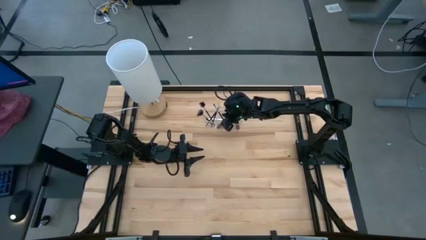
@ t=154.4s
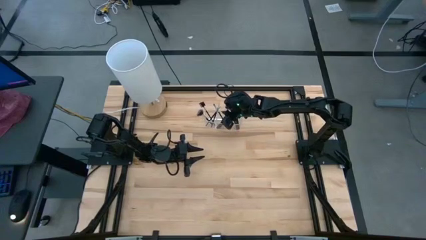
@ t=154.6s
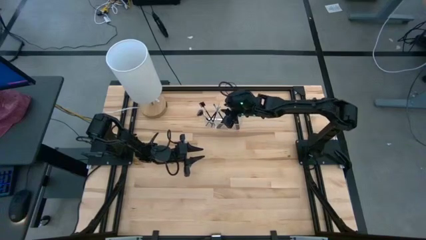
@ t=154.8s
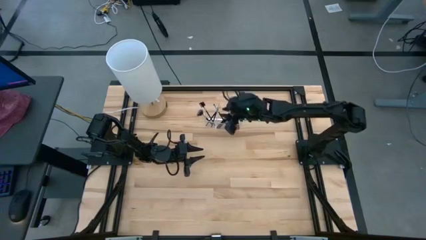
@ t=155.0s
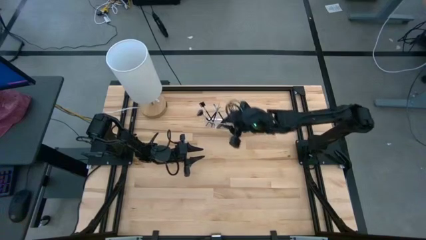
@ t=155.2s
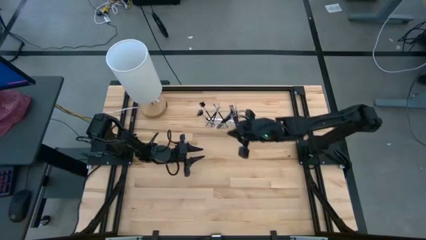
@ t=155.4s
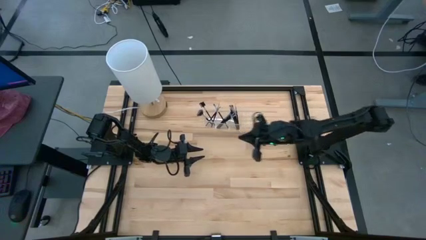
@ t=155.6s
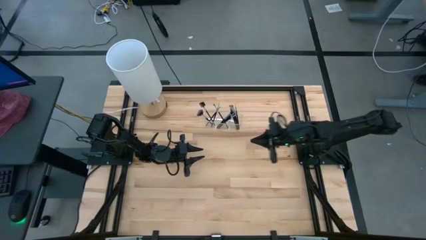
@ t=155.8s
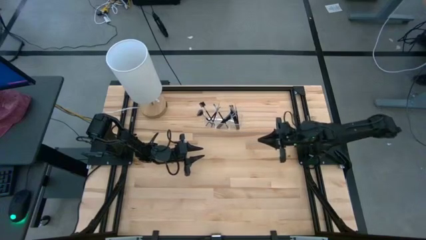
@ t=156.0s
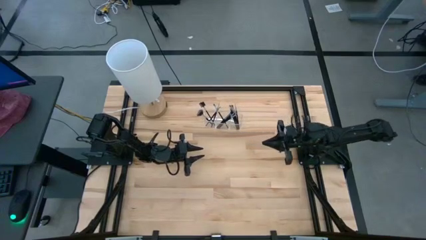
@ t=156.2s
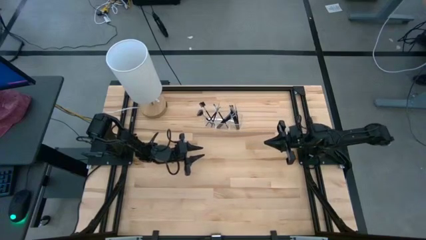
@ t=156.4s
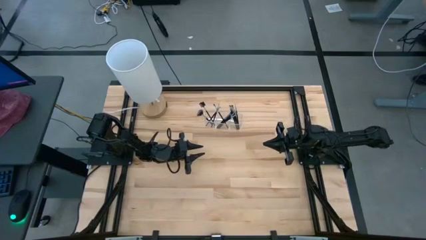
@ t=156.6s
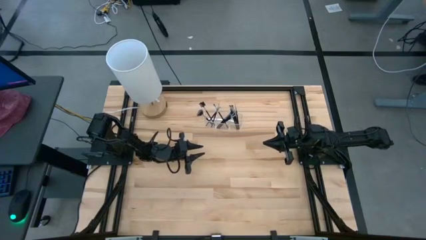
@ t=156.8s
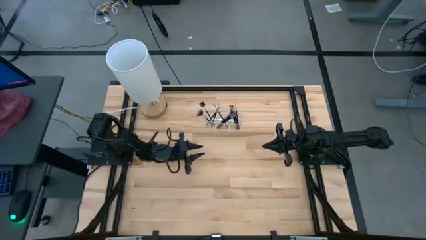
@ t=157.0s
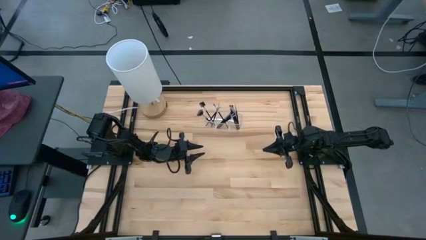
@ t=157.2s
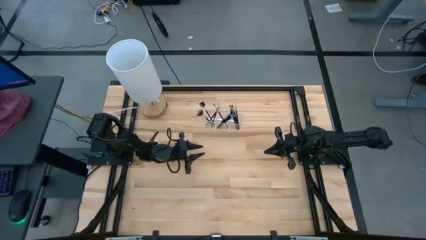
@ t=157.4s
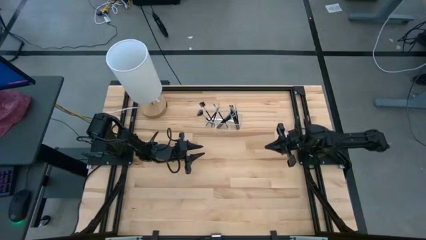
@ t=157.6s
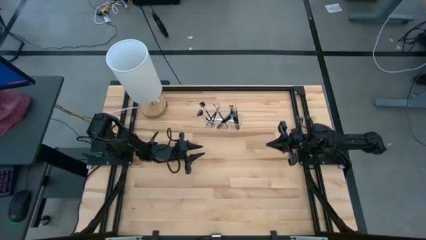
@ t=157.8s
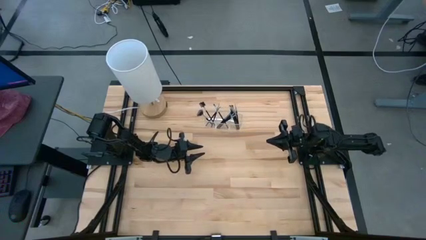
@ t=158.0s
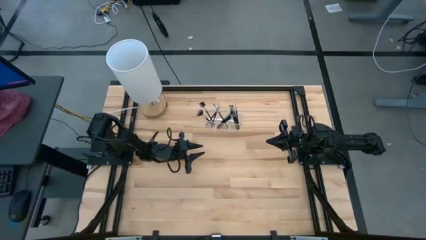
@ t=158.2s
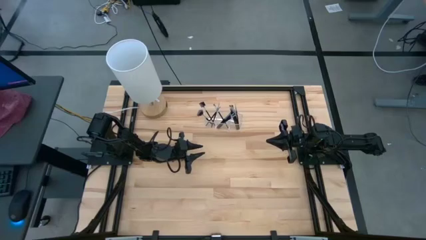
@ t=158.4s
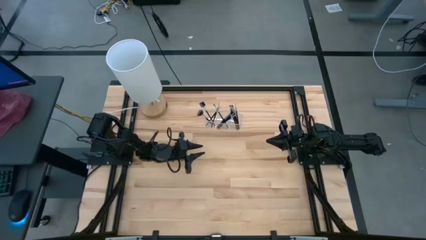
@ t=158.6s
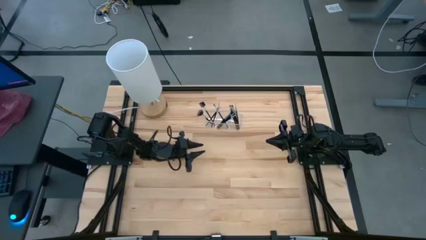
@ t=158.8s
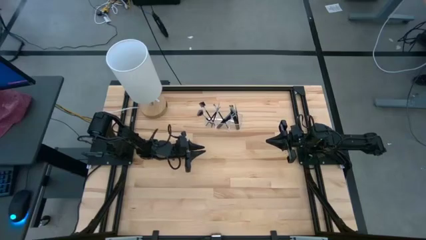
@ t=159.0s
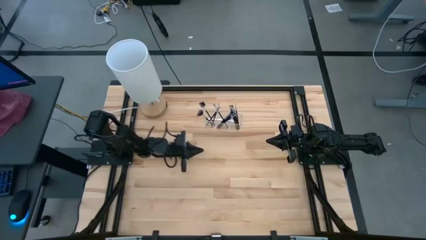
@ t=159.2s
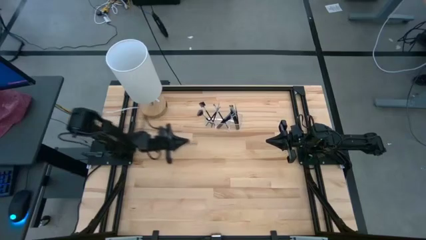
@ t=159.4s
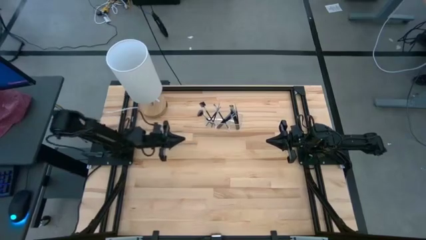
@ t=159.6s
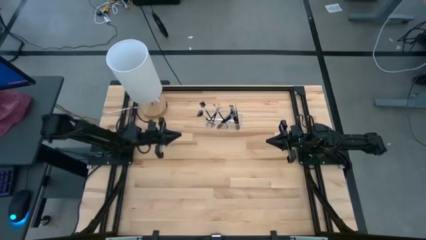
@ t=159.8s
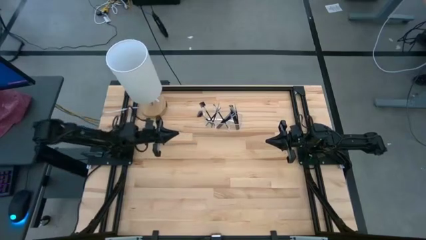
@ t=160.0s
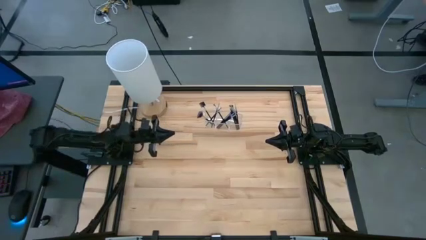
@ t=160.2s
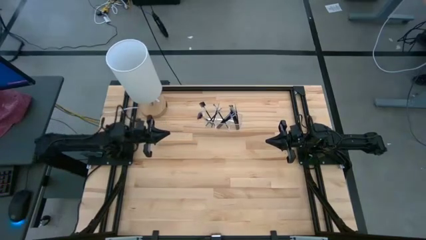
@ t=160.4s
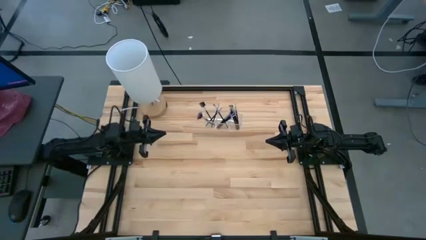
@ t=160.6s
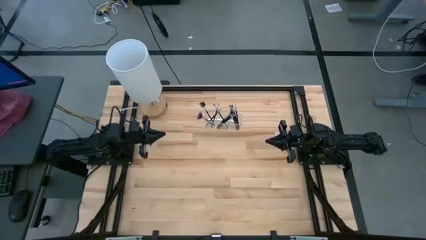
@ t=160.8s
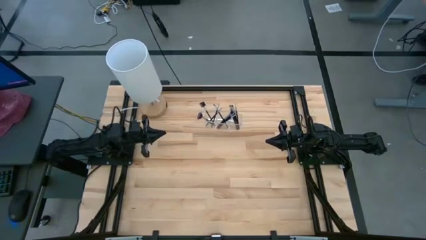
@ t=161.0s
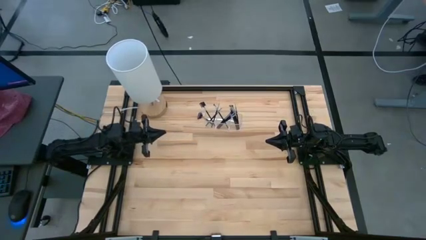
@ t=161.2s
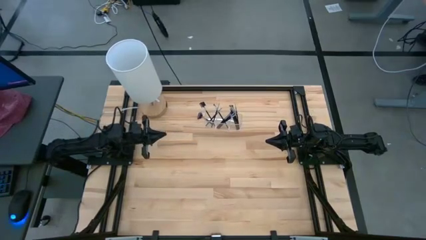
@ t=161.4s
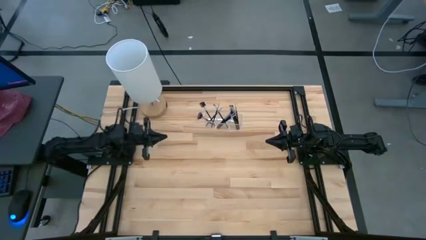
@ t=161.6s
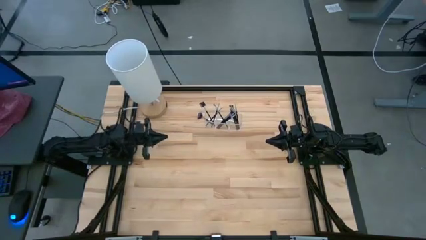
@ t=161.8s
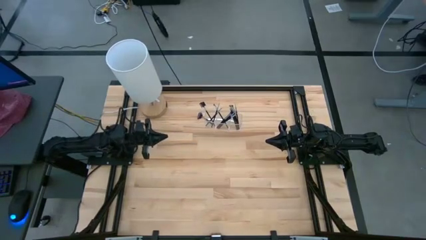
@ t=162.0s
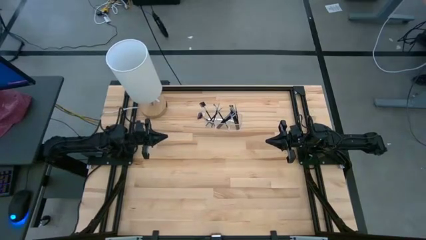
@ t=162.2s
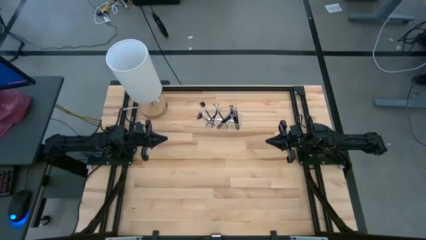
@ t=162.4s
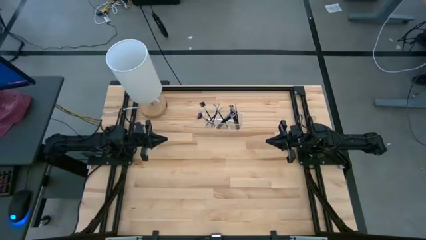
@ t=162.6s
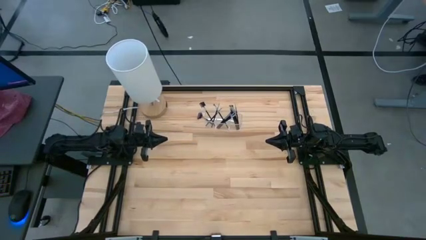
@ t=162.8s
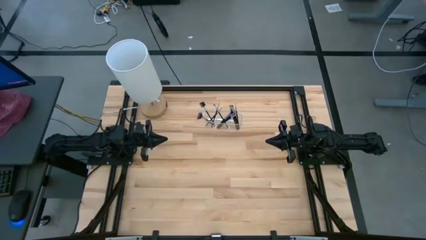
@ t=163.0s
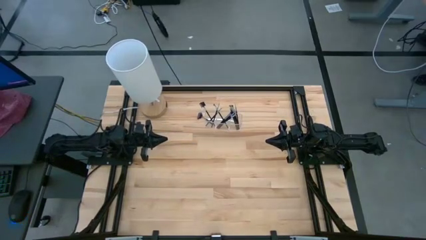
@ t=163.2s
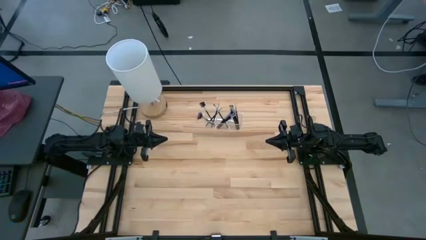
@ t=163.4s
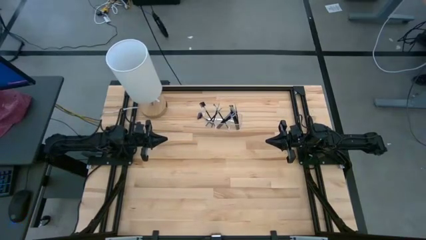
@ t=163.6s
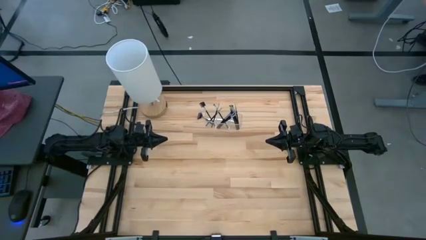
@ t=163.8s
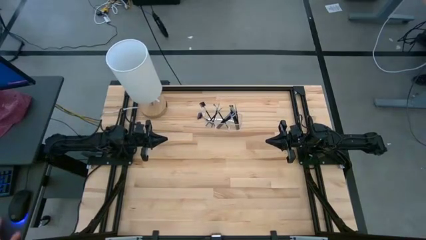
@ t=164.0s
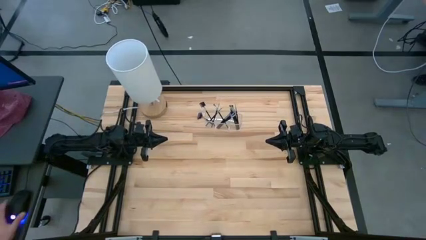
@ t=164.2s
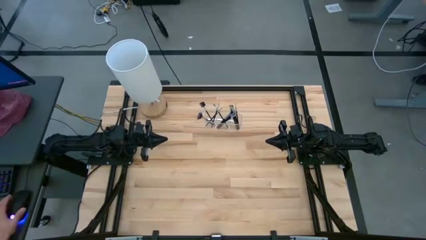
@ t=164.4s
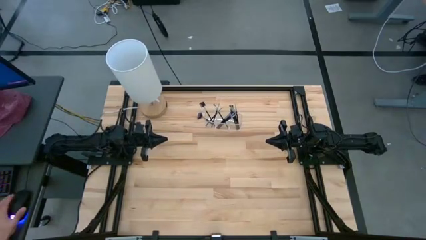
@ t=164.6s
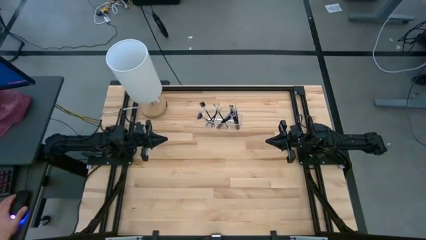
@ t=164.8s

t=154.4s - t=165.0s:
Task: Put items in baskets/containers
Return to Home Position

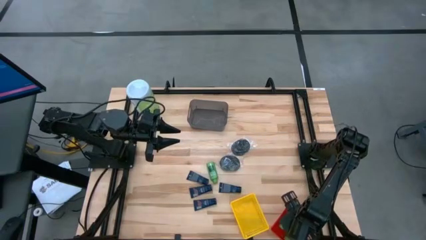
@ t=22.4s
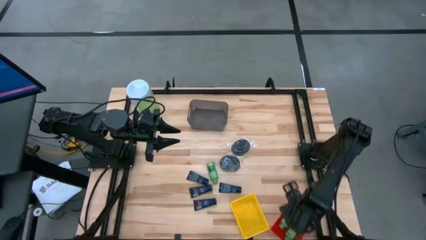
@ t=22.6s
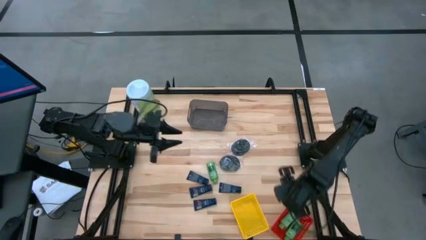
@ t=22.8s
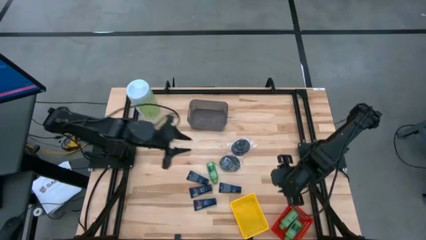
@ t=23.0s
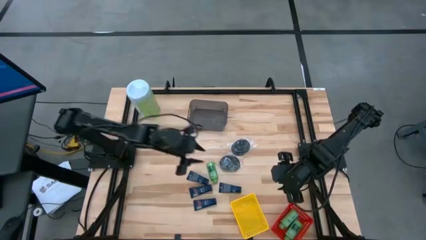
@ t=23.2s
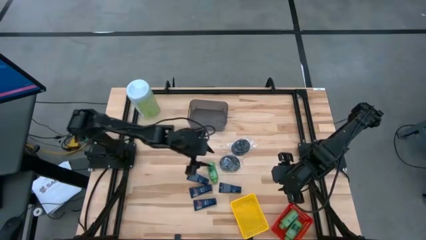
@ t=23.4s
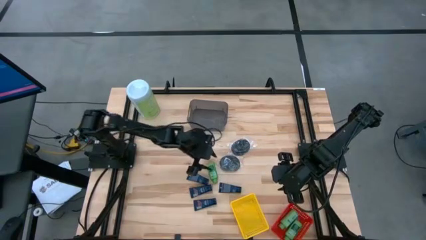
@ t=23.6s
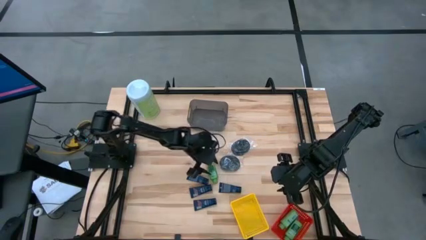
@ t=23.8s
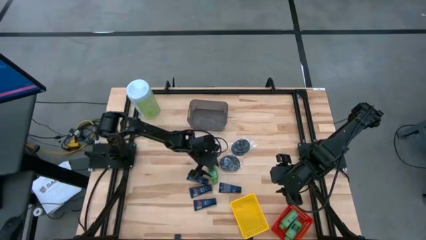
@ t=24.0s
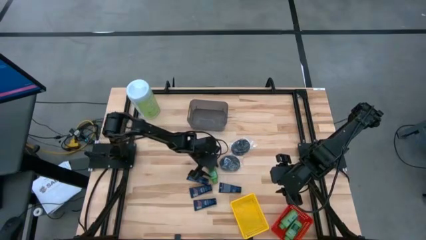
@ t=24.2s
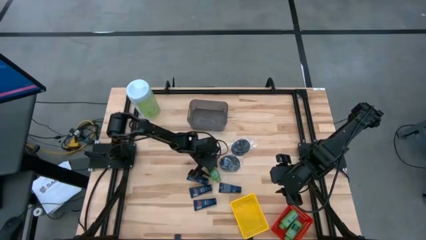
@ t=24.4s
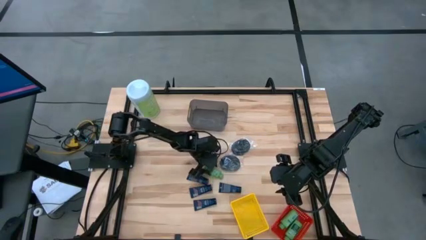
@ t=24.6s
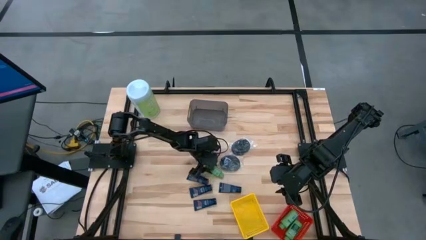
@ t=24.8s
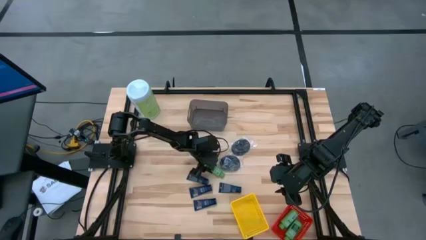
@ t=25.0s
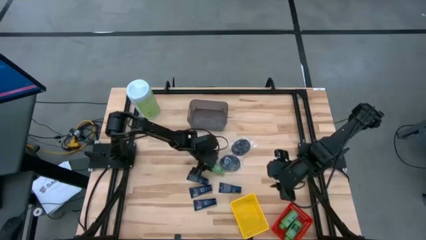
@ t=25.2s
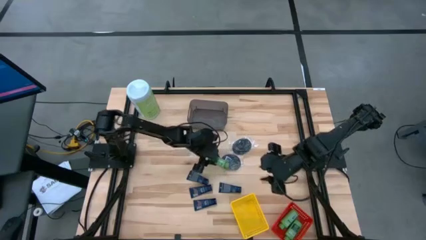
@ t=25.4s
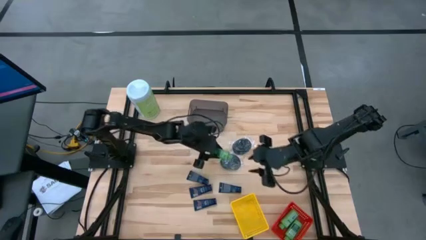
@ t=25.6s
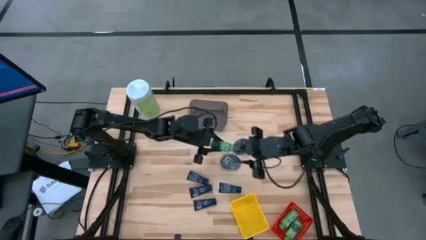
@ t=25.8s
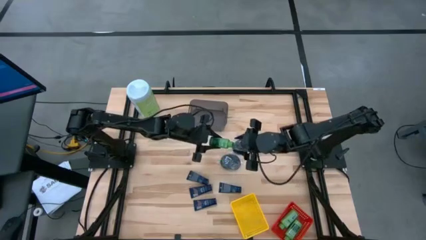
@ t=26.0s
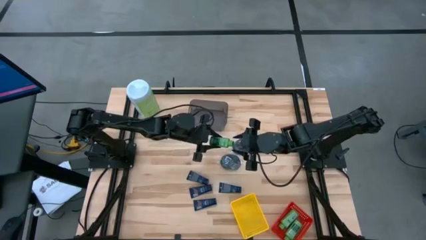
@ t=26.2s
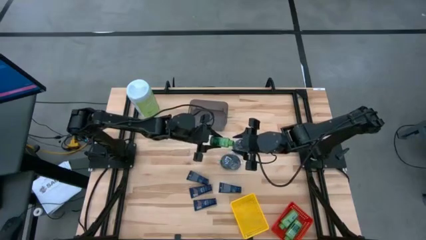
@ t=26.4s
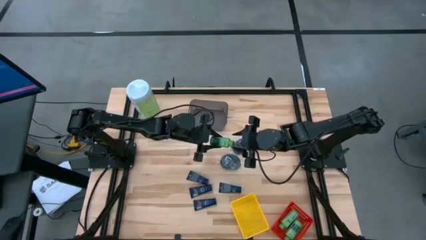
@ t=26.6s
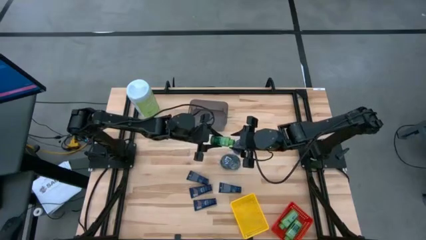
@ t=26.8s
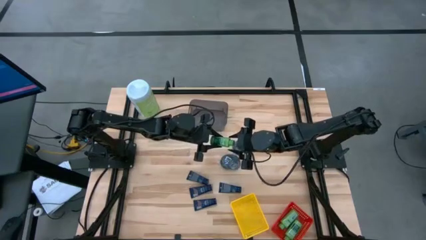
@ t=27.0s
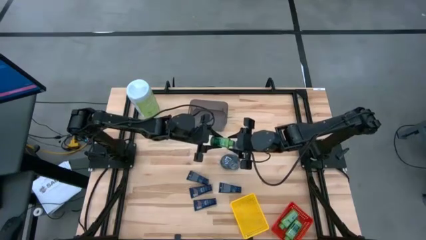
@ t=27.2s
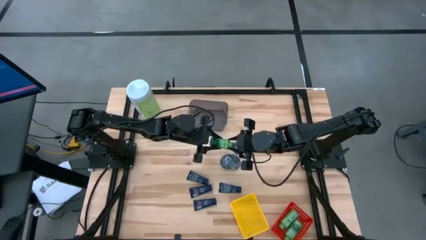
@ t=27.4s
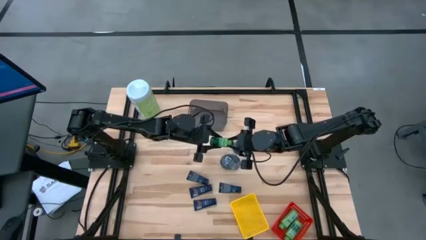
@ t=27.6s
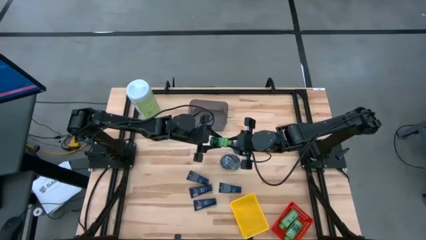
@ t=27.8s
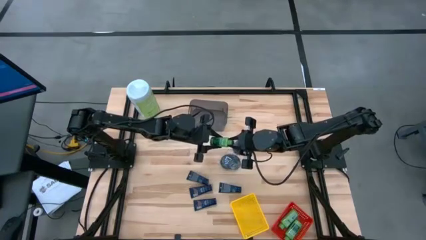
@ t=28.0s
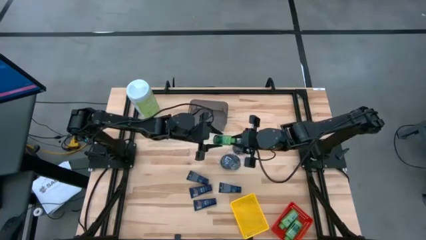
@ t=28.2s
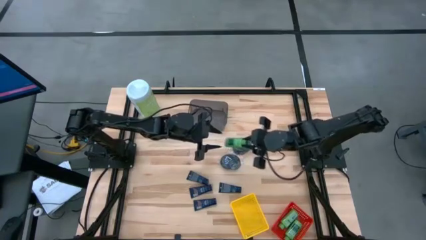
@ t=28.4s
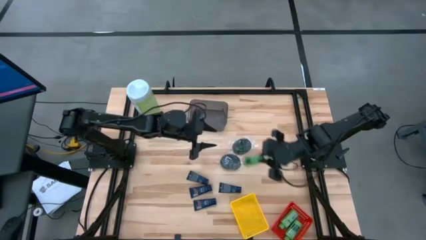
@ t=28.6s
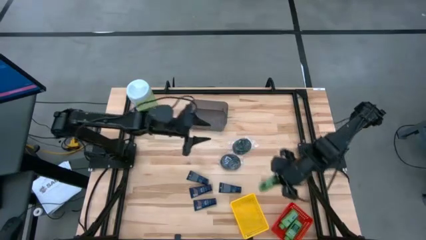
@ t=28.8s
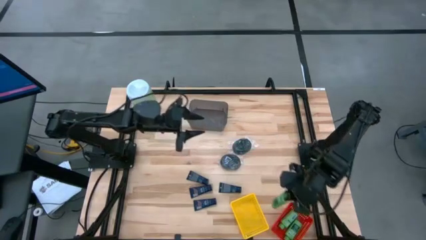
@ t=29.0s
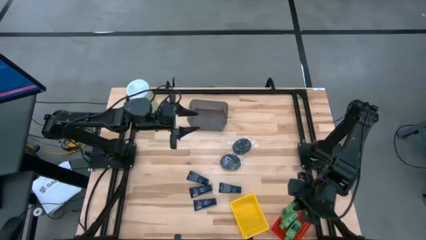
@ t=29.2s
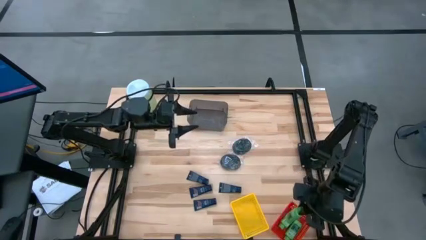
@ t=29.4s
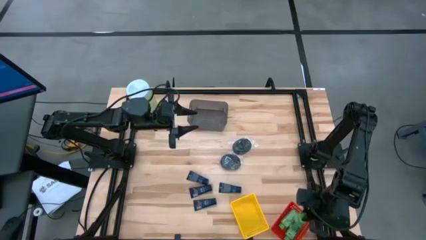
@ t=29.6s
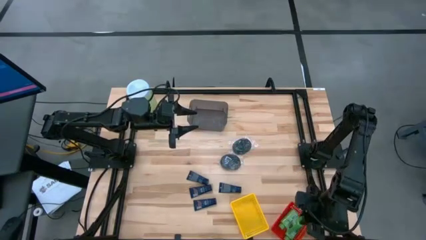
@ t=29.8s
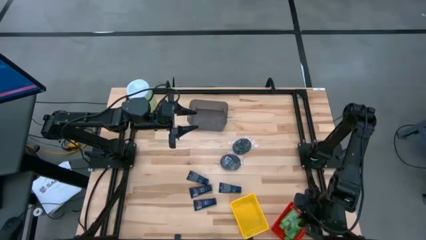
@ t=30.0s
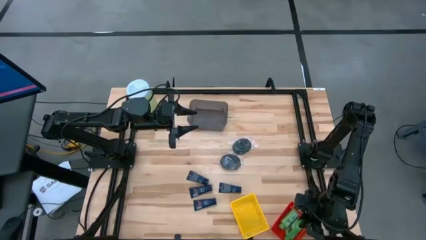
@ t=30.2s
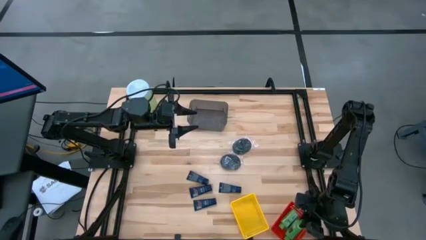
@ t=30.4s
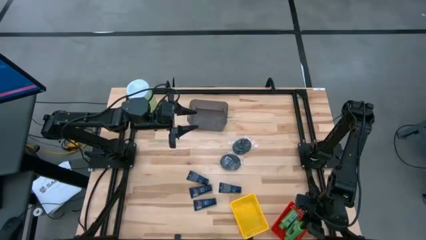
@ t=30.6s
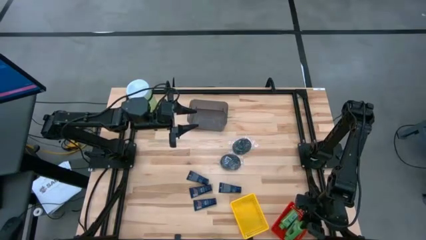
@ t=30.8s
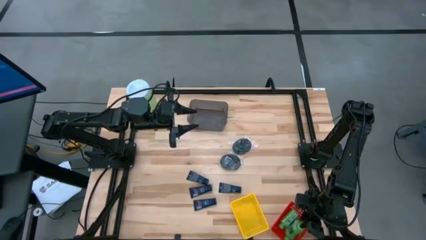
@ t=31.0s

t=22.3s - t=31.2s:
Task: Pick & Place Travel size toiletries
Put the green shampoo bottle on the red bin
